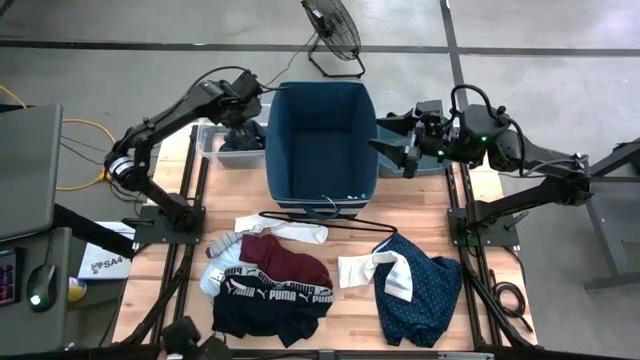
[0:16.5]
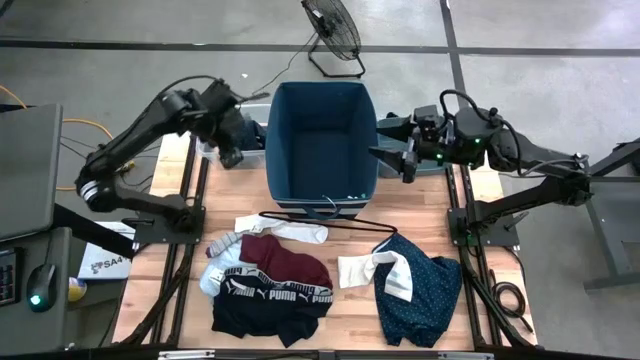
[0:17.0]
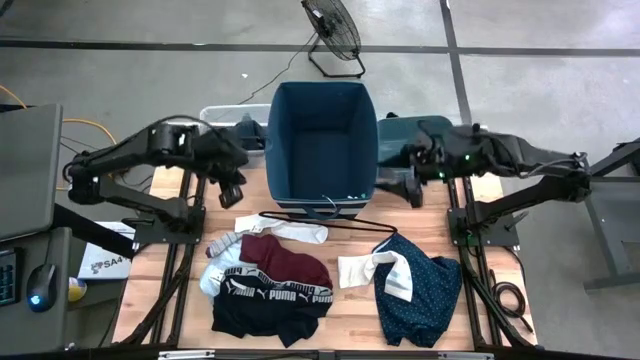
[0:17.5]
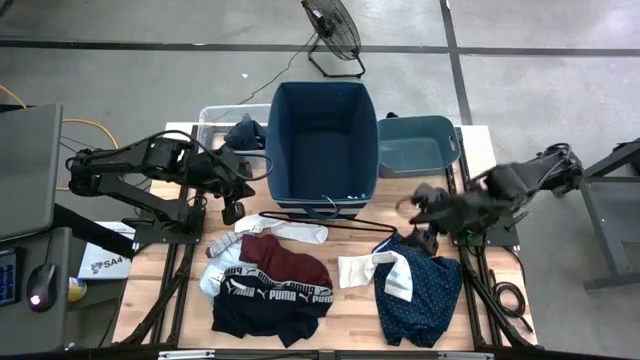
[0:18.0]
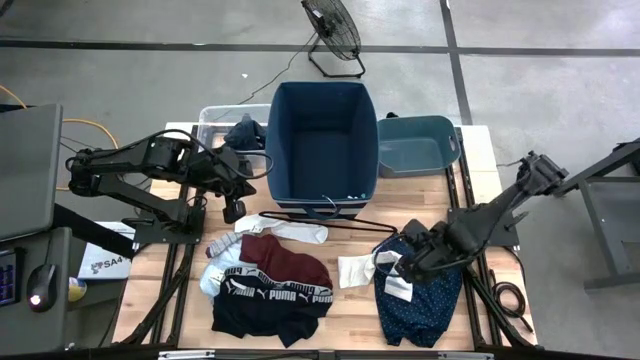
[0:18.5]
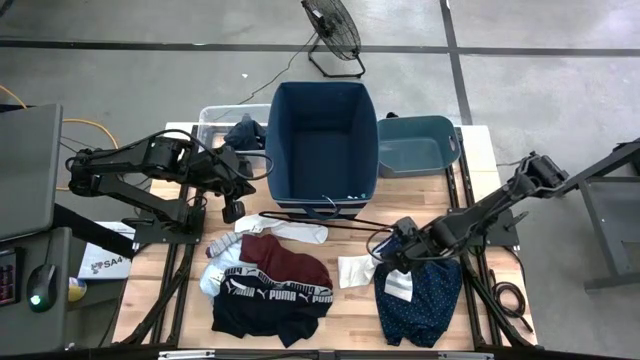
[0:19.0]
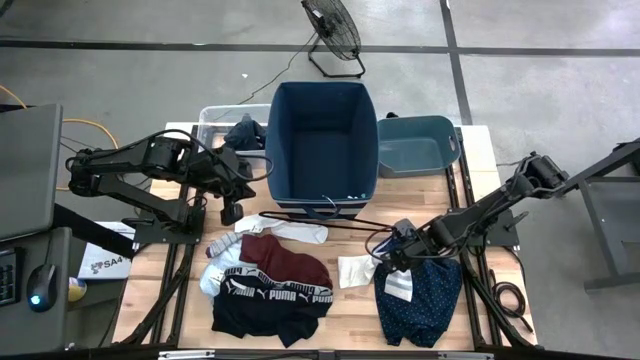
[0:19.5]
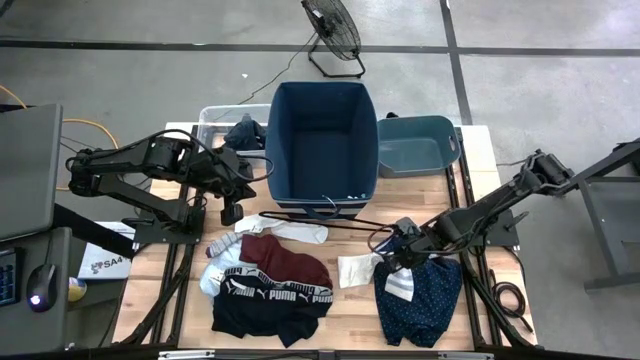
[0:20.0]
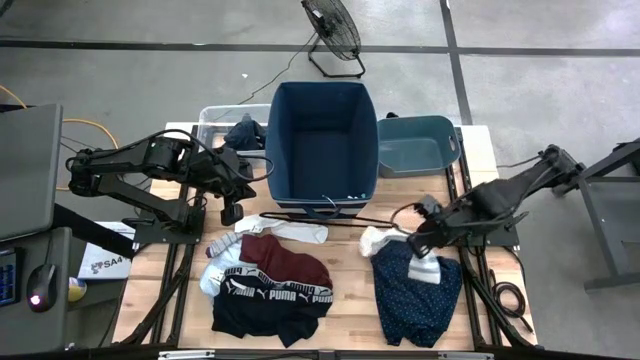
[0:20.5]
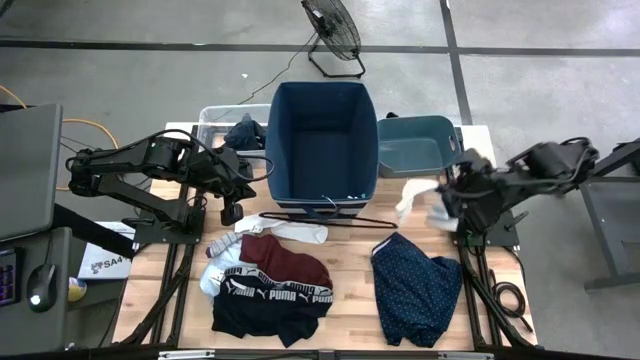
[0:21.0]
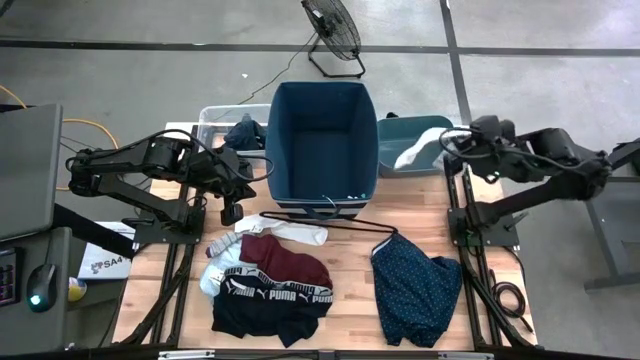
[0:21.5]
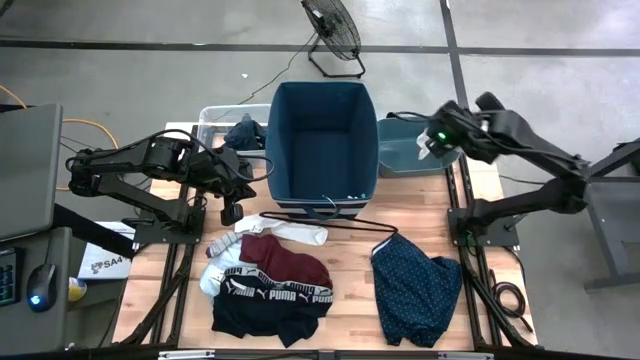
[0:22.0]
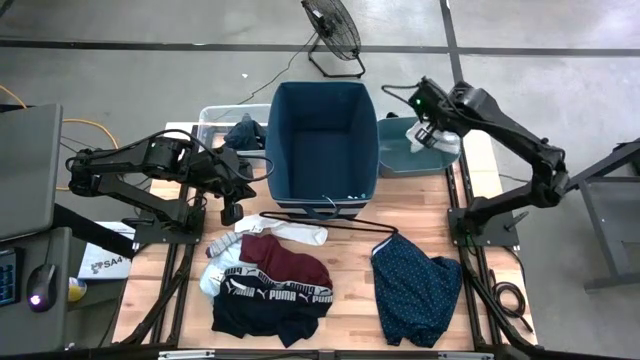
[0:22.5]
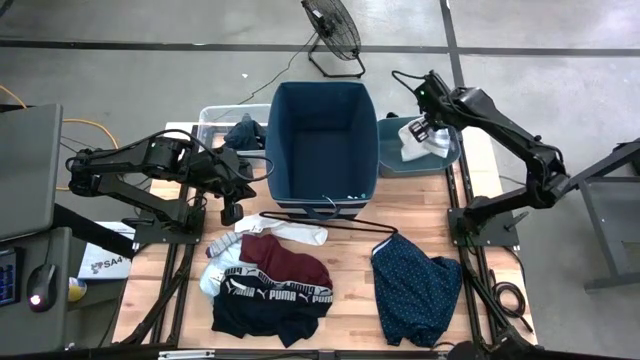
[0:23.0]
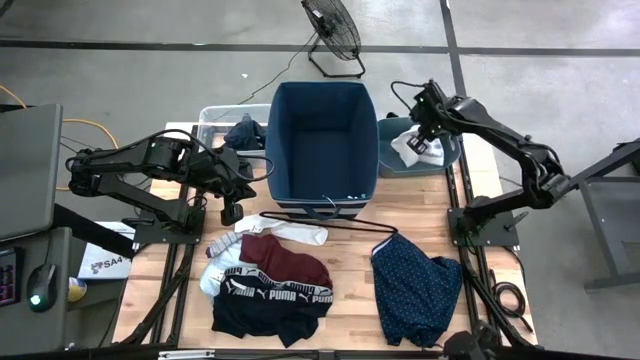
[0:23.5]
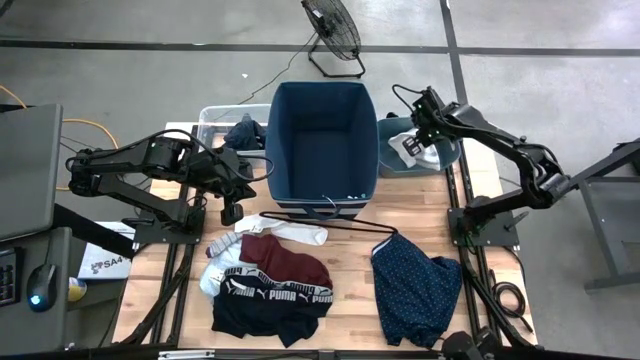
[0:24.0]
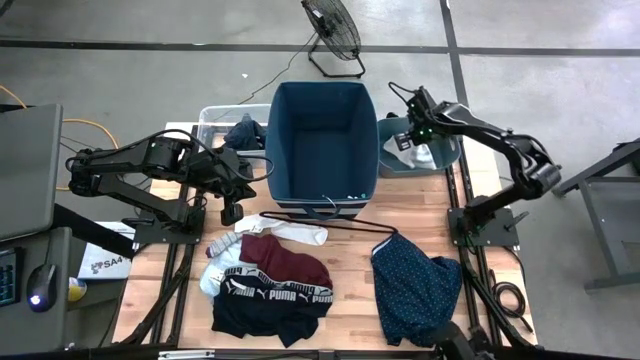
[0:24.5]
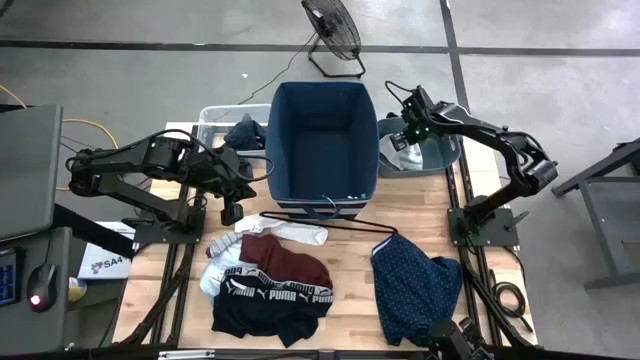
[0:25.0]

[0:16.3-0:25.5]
Task: Pick & Place Cloths
Put the right white sock into the green bin

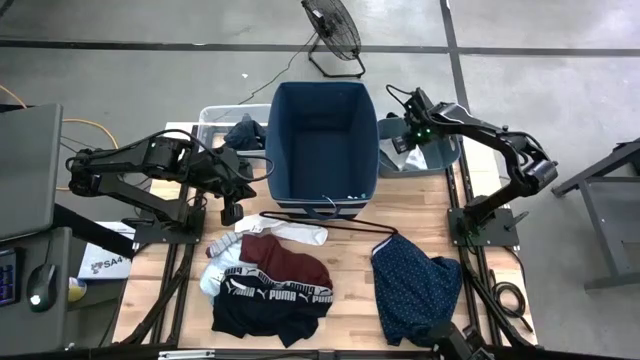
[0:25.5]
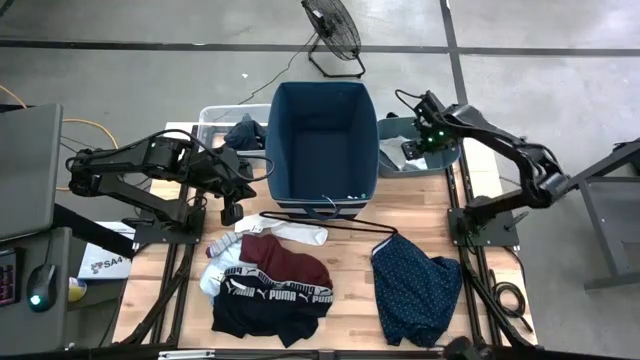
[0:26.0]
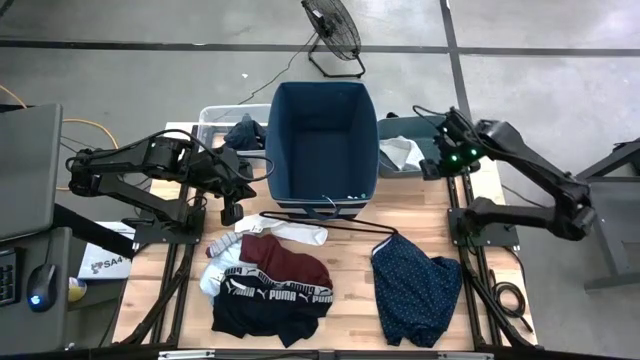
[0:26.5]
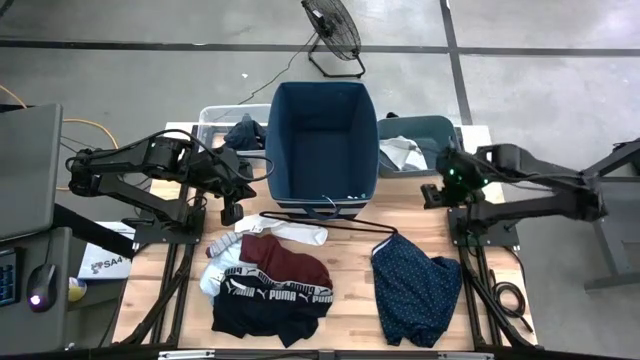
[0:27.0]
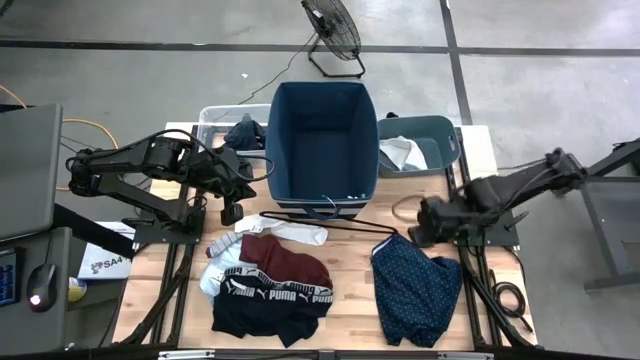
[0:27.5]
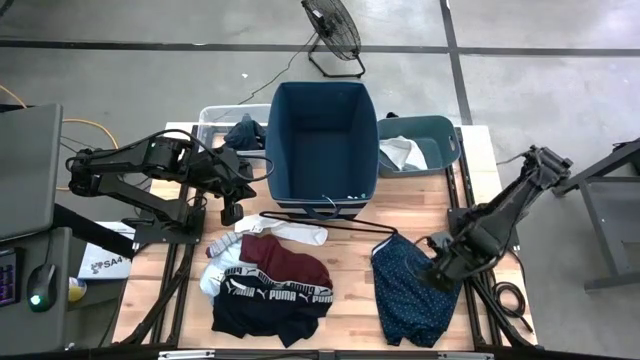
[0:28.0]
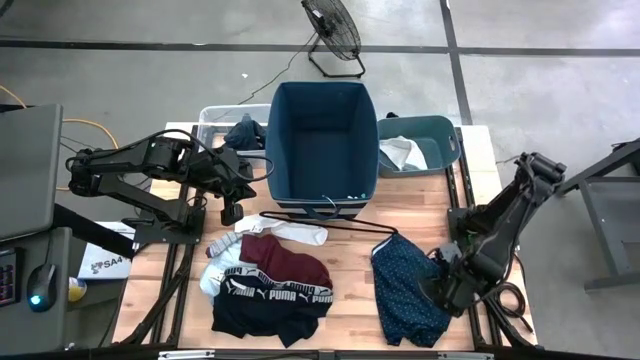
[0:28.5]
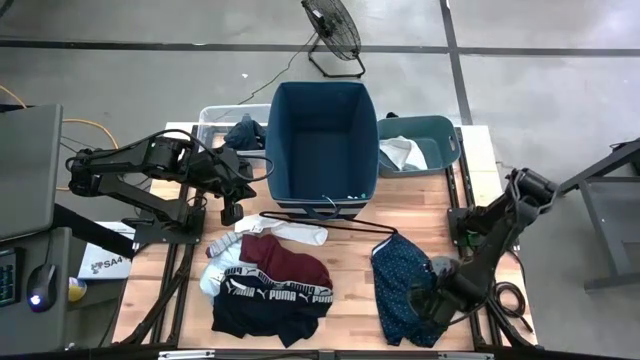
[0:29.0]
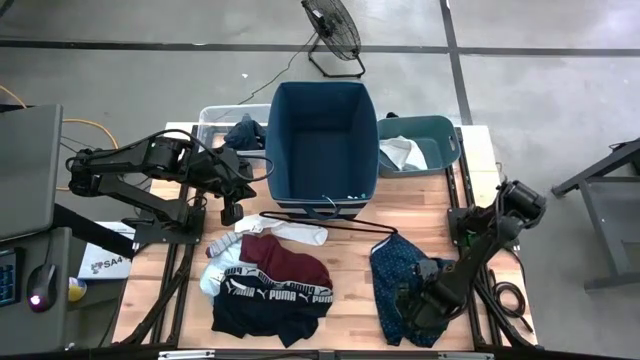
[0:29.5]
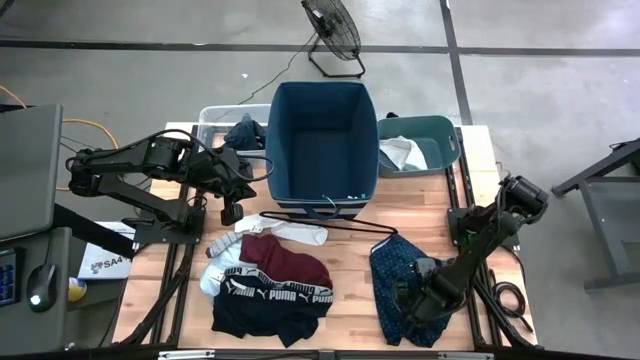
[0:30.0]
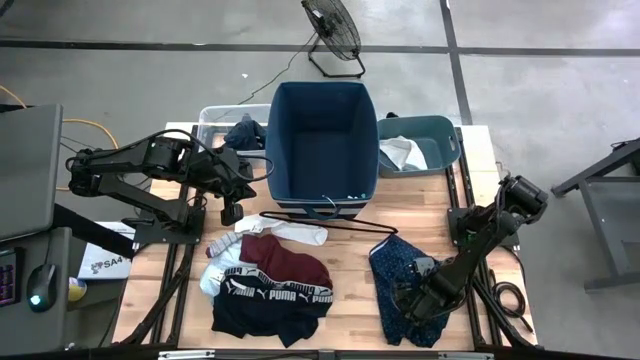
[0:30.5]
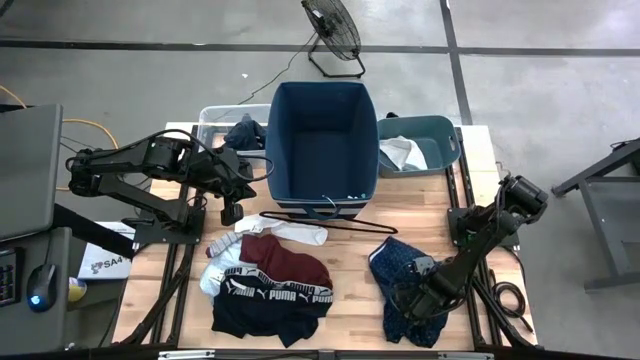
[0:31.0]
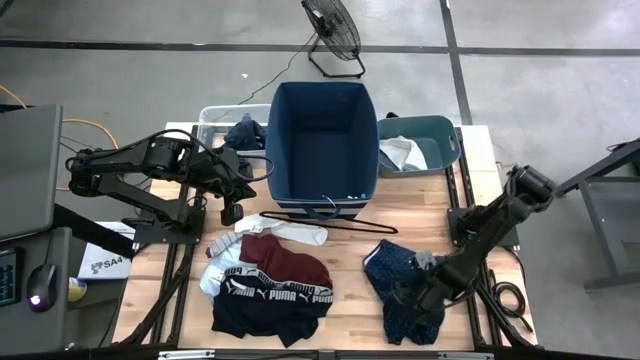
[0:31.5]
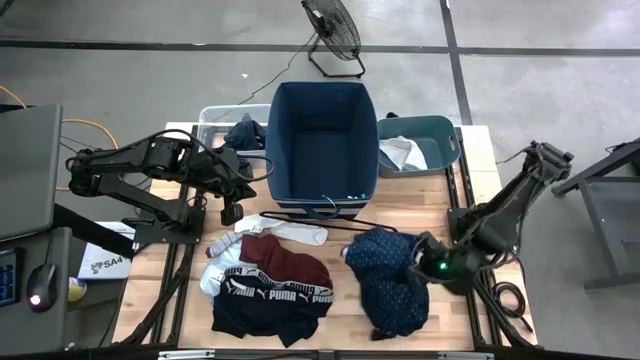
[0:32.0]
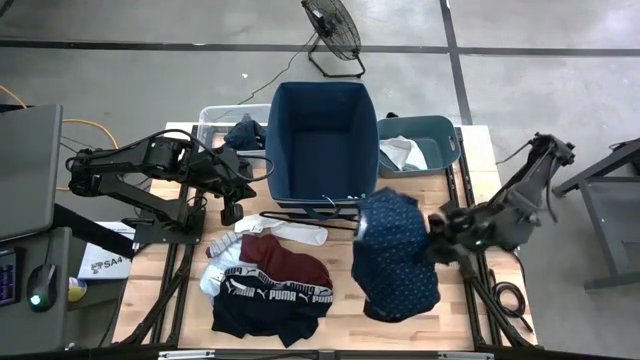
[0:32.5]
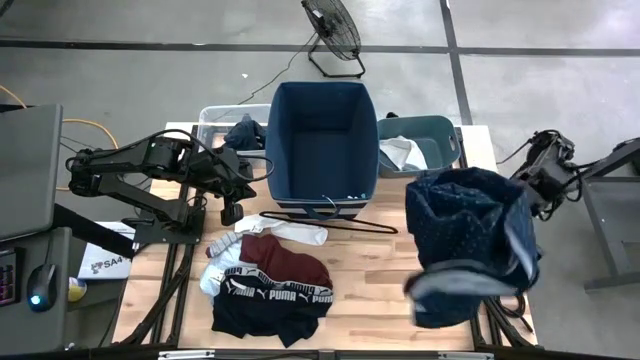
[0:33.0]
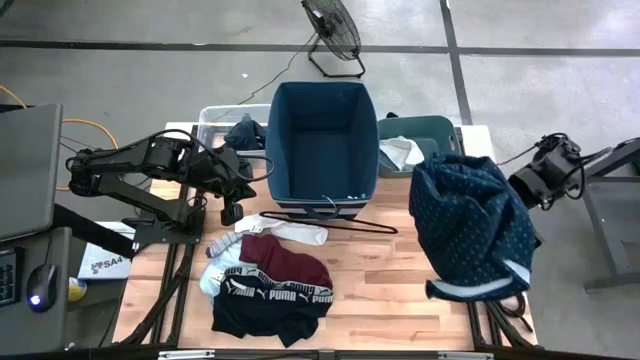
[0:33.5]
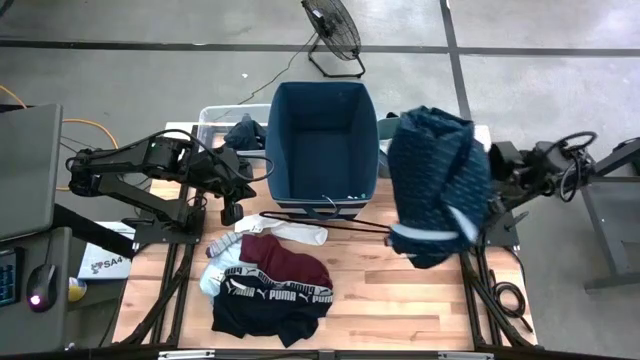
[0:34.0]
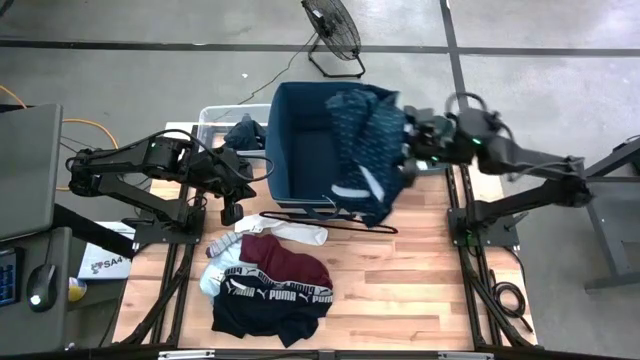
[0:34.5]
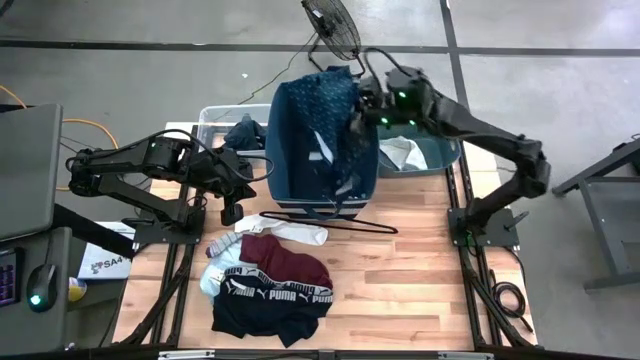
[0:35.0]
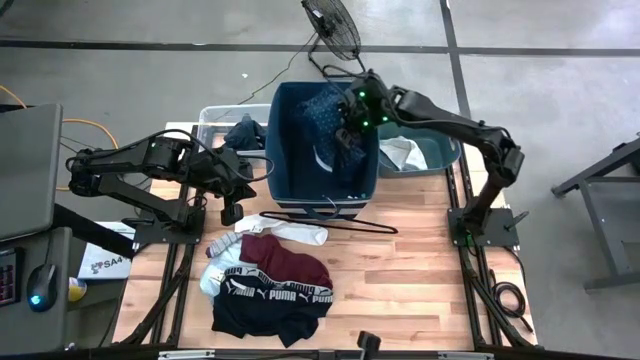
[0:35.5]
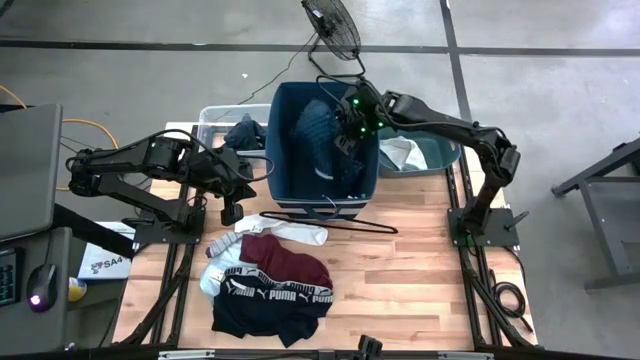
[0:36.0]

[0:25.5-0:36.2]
Put the blue shirt into the blue bin
